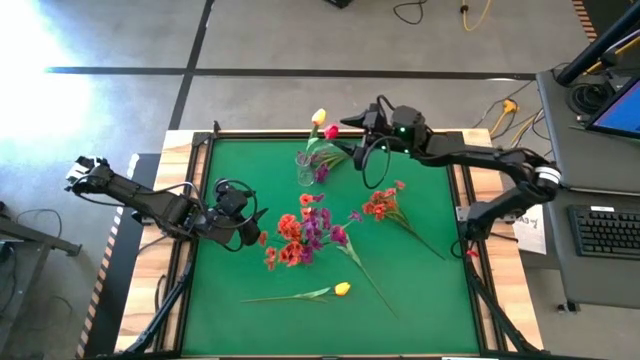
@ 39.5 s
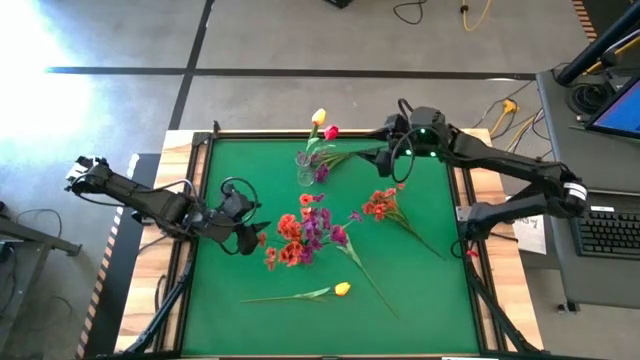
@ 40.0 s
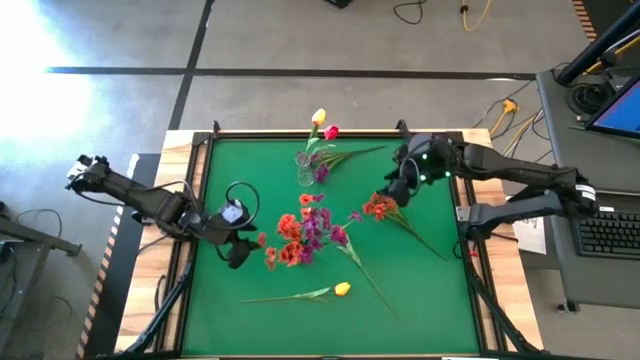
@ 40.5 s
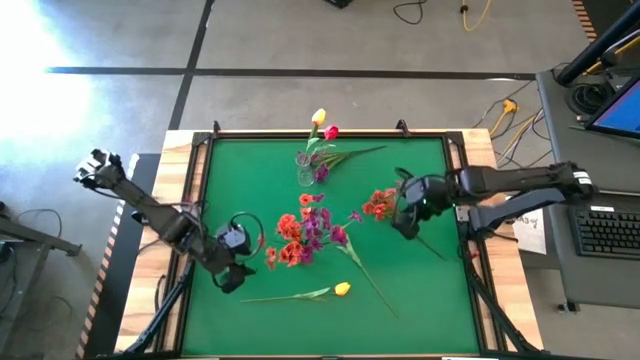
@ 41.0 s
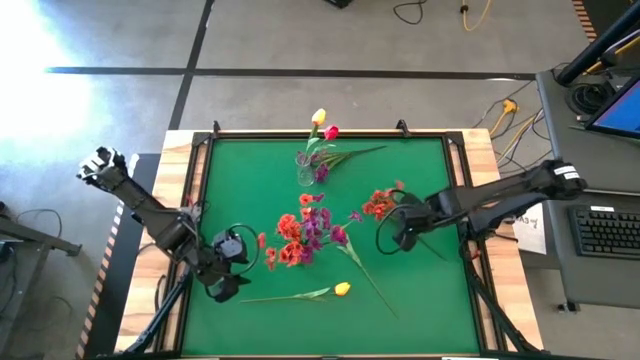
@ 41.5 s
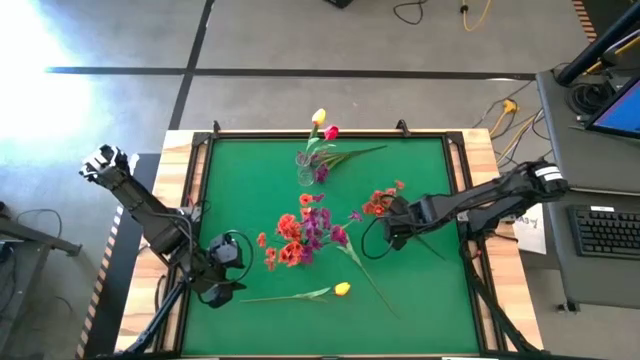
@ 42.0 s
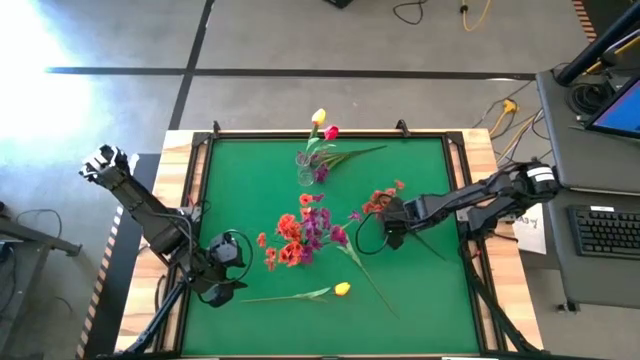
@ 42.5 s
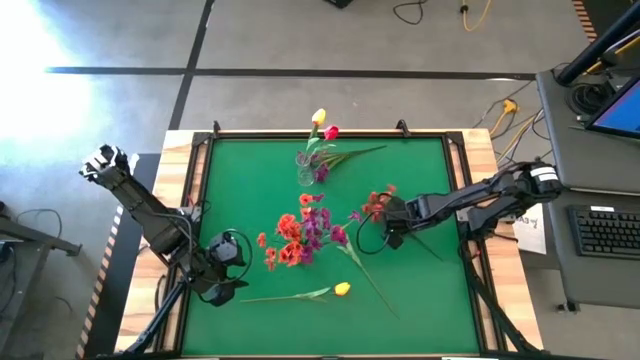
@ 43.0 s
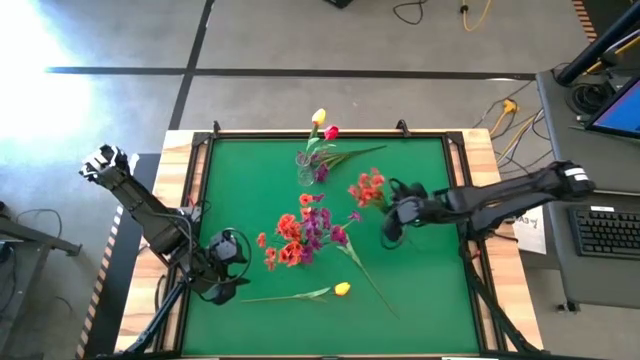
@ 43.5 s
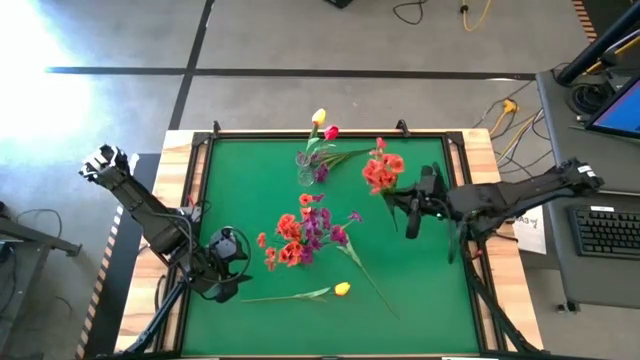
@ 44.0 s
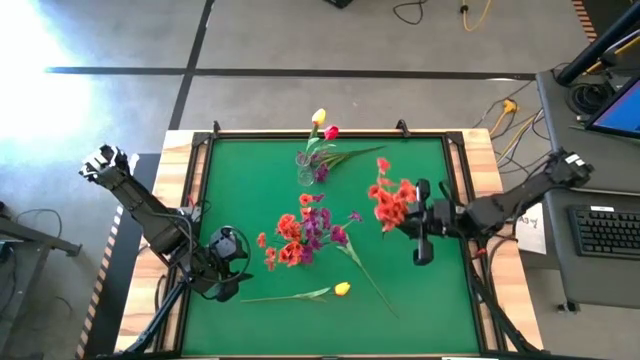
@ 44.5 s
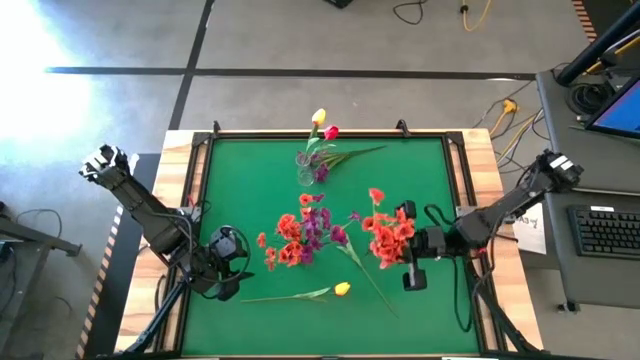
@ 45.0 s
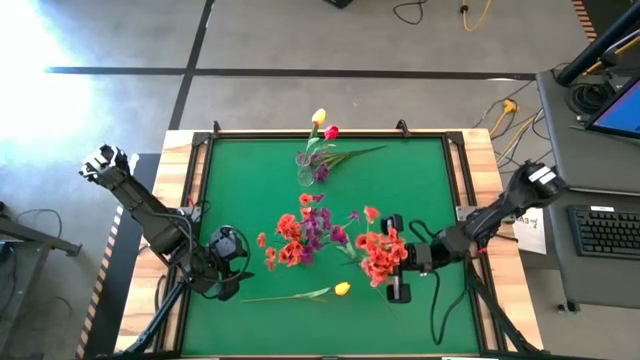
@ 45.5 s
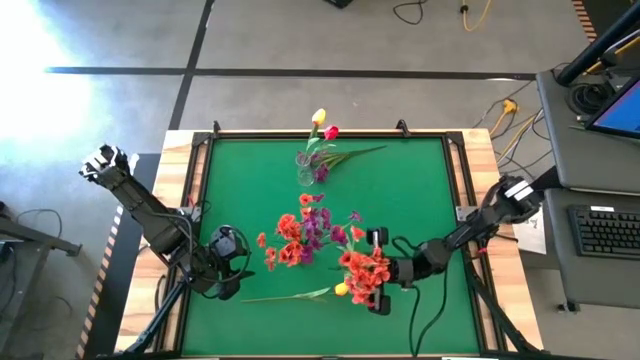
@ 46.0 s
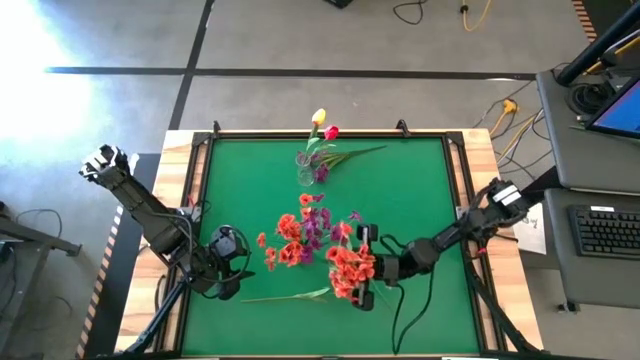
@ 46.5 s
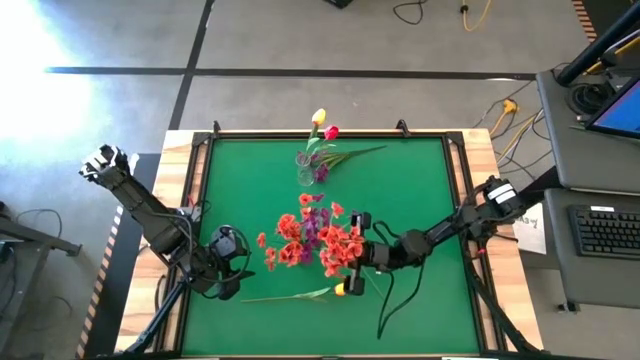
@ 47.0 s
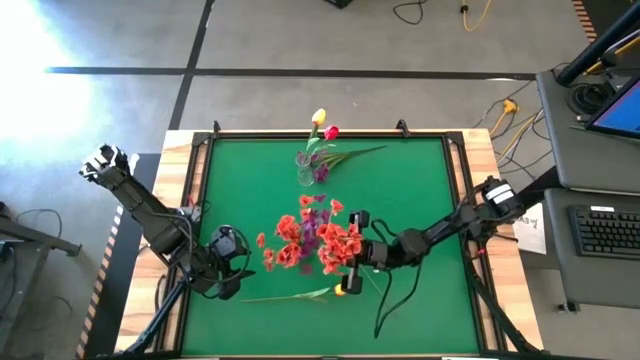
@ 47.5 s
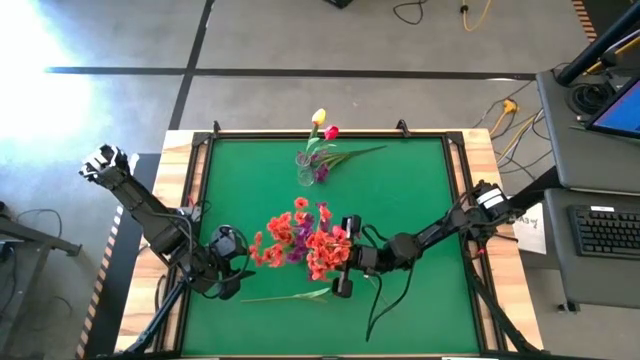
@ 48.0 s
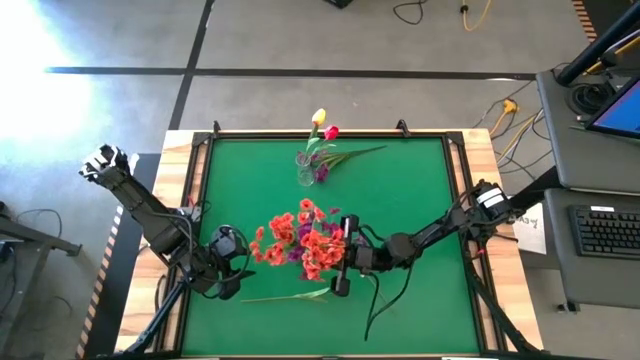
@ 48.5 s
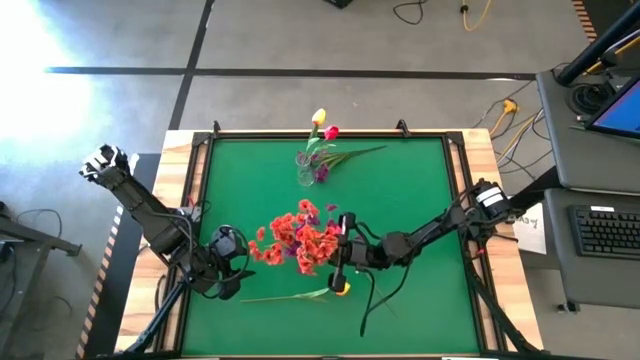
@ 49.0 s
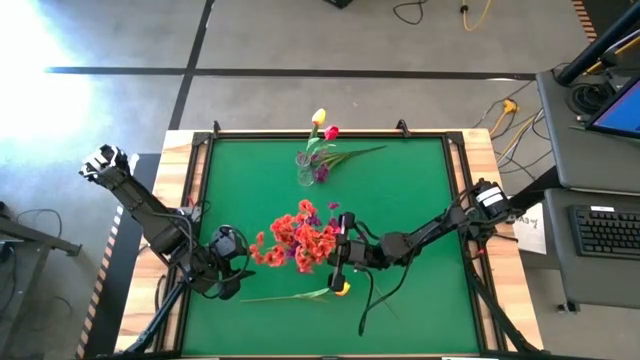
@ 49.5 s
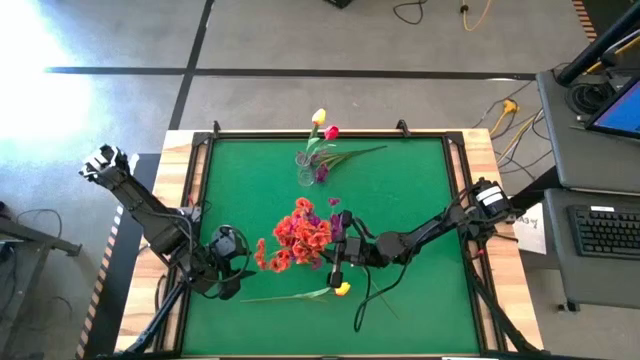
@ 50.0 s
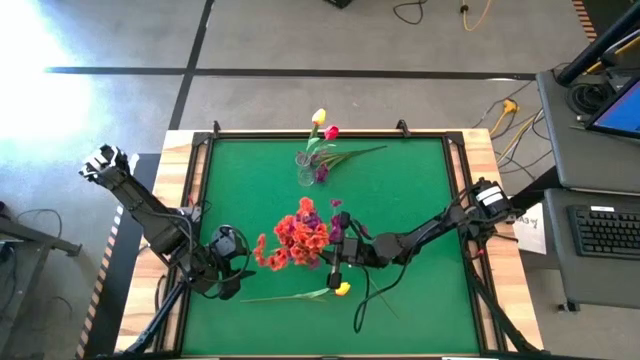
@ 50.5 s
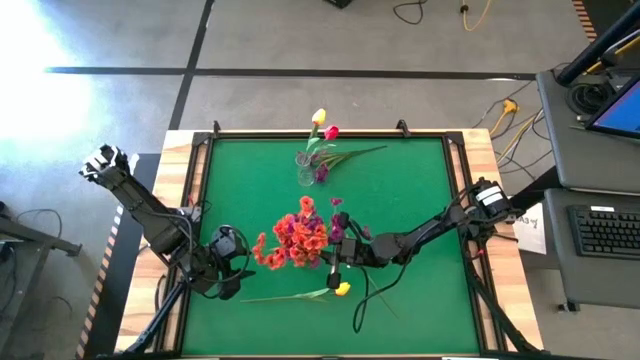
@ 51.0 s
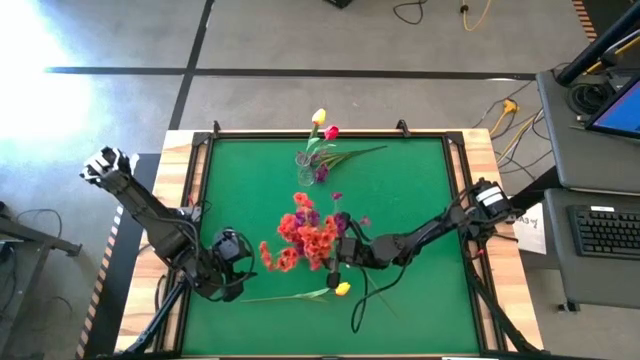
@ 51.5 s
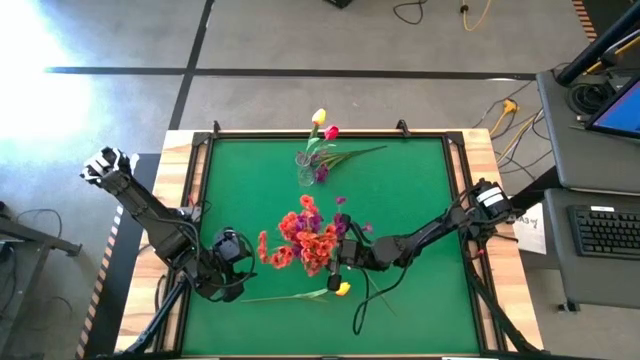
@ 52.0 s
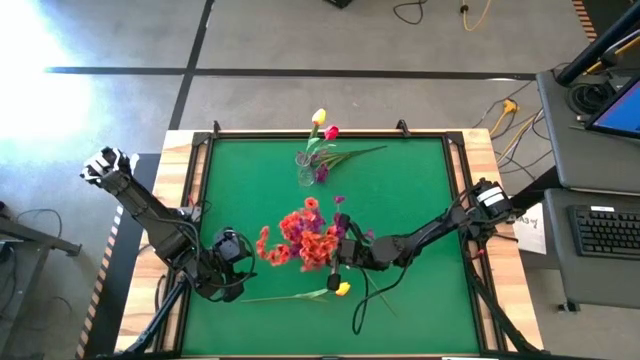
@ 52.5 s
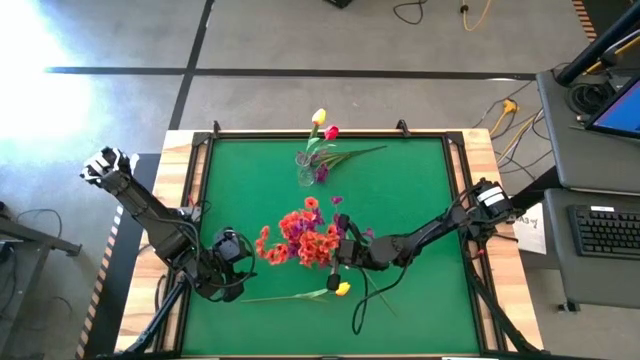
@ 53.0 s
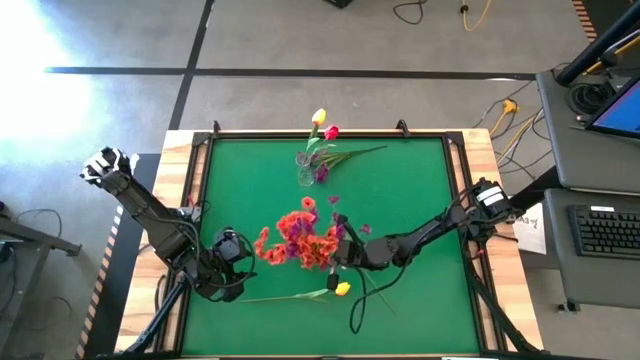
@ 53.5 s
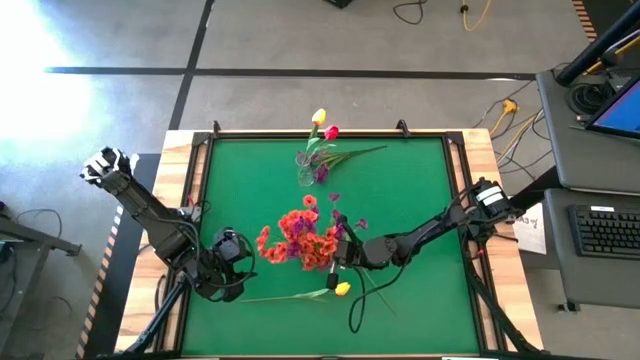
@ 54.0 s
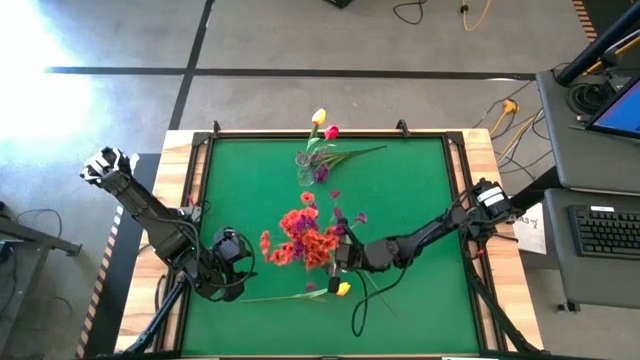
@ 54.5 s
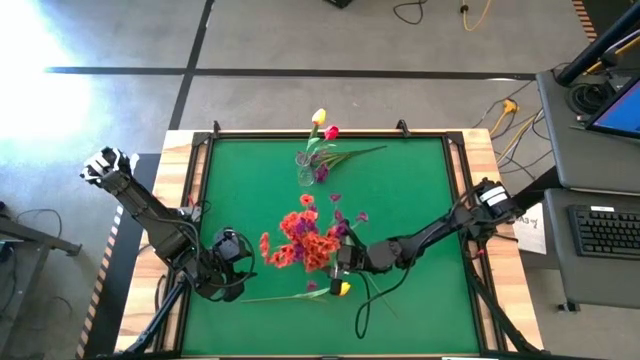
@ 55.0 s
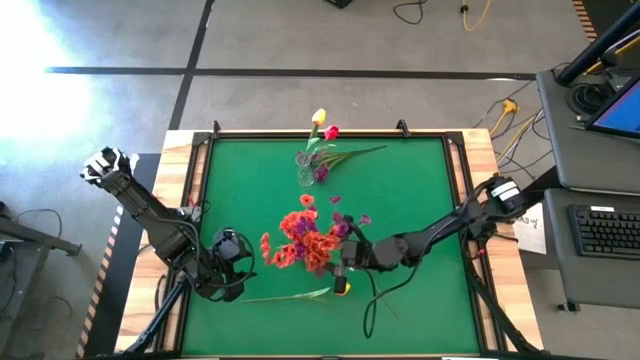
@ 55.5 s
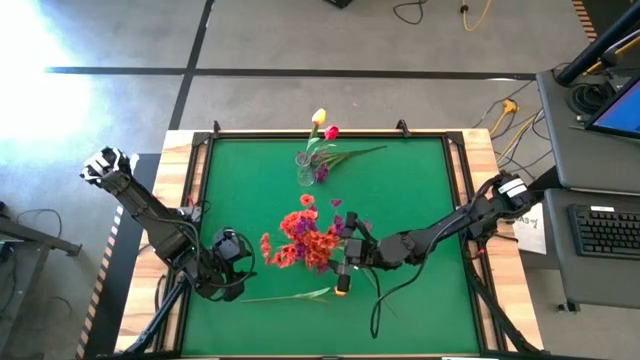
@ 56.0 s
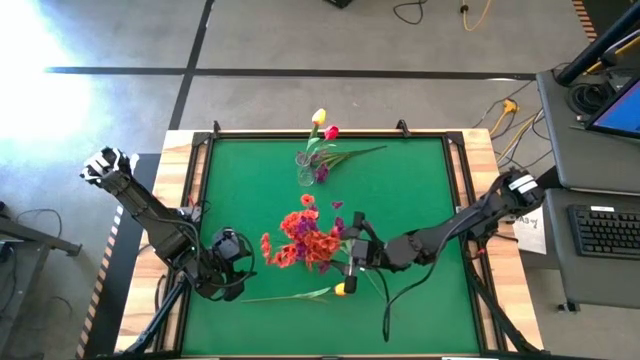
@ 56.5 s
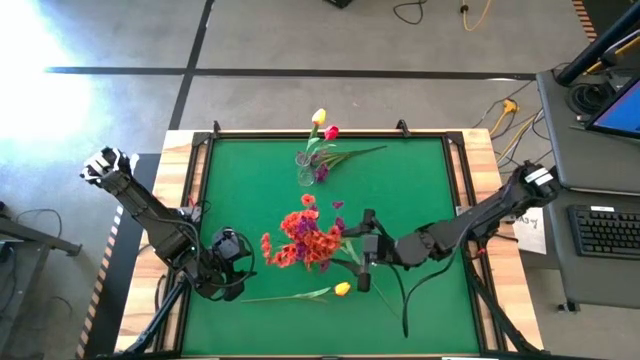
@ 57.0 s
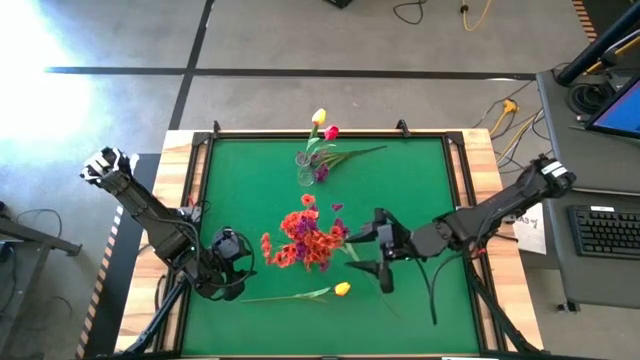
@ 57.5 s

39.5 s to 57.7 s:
Task: Sort flowers into vase by color
Put the orange flowers into the green vase

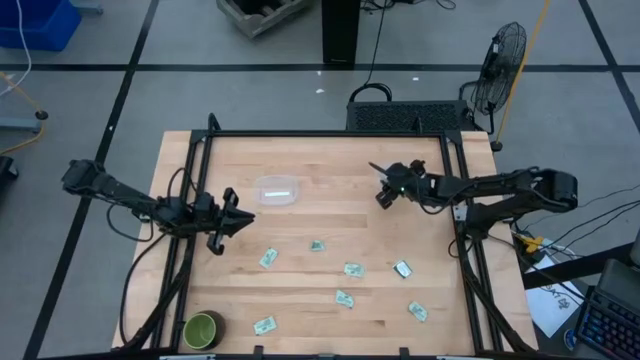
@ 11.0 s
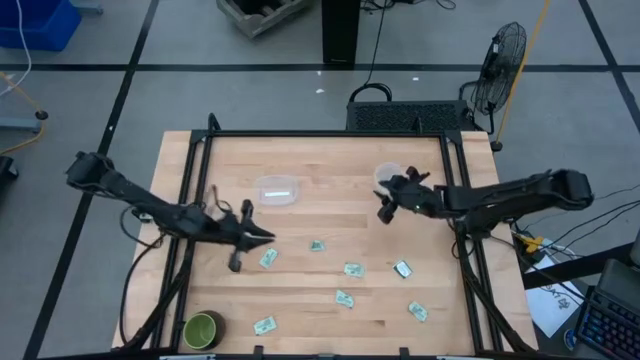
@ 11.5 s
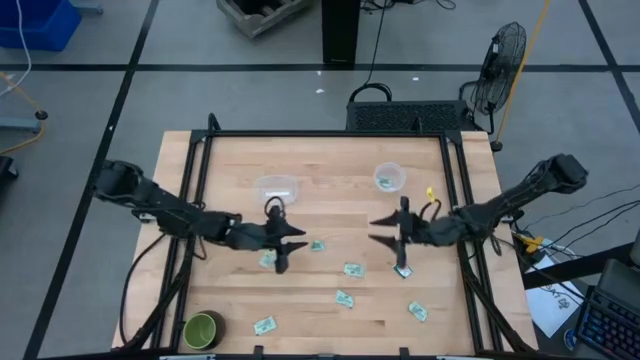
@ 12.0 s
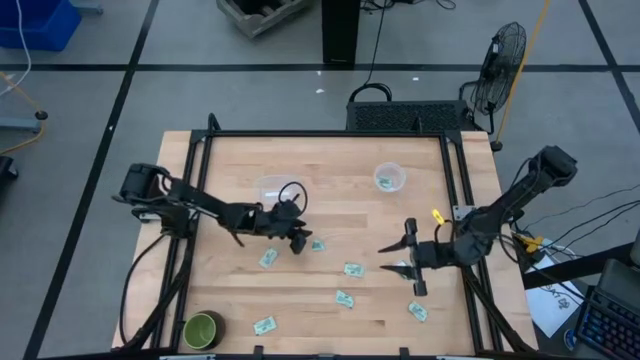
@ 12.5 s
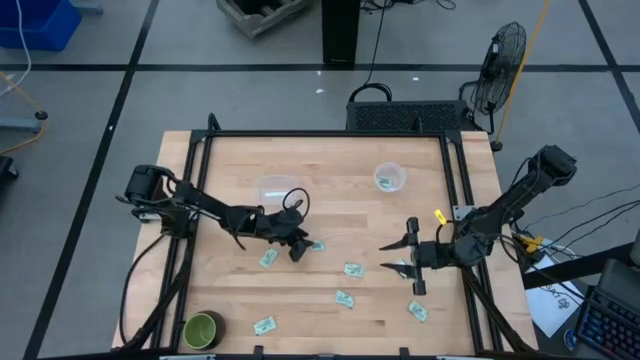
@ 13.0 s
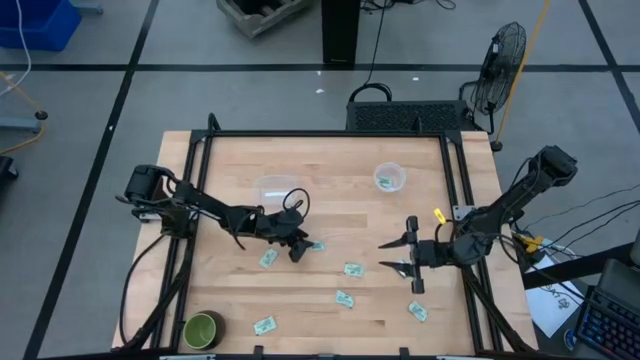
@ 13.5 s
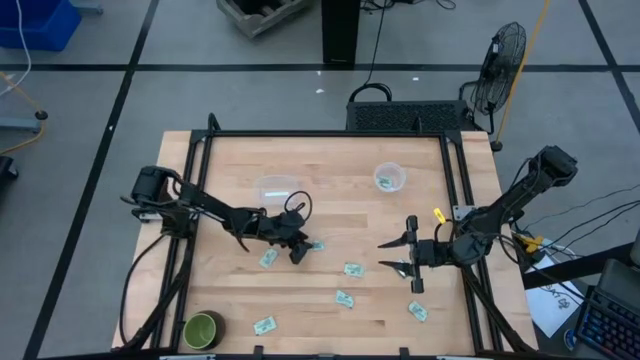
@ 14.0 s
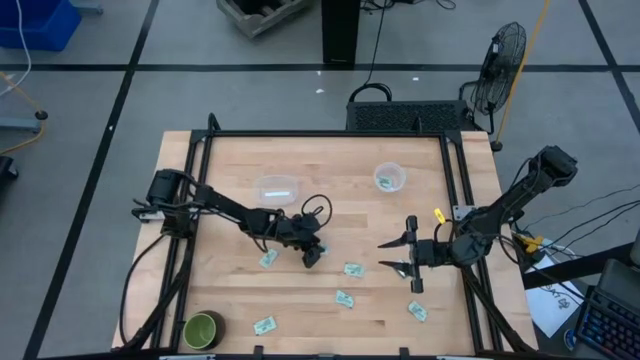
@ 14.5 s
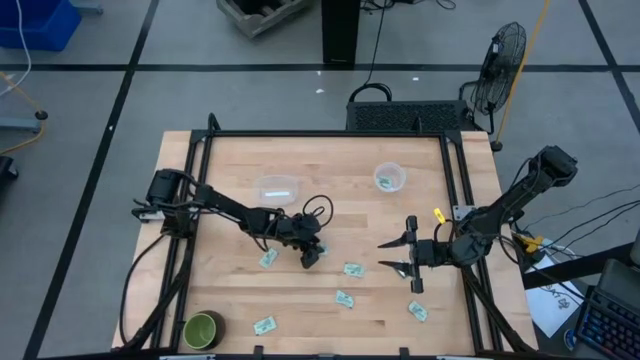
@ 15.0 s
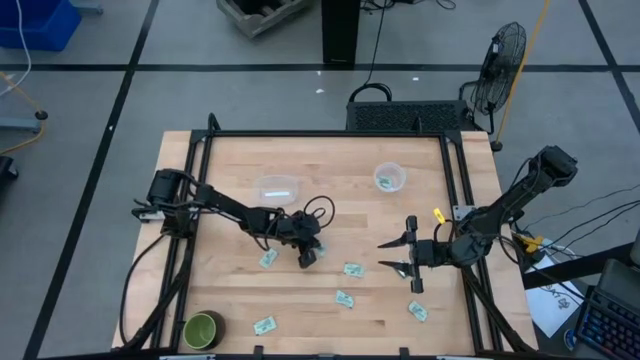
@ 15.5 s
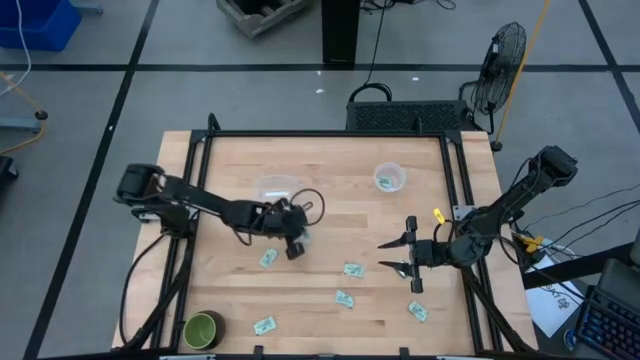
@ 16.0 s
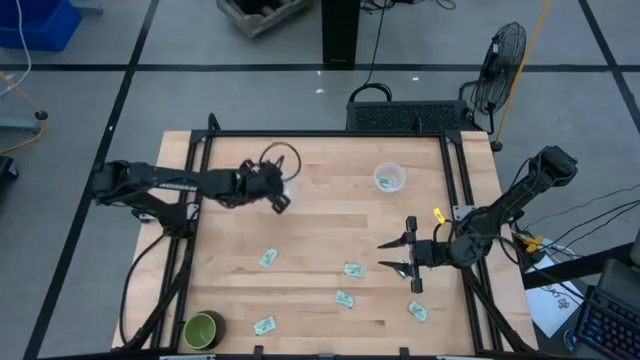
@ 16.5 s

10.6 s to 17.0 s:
Task: Pick and place items into bin
Put the stevia packet into the left transparent bin
